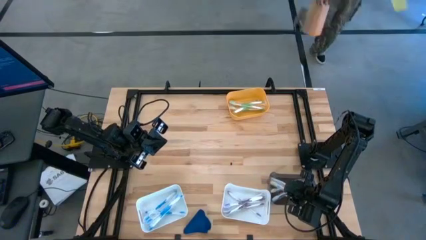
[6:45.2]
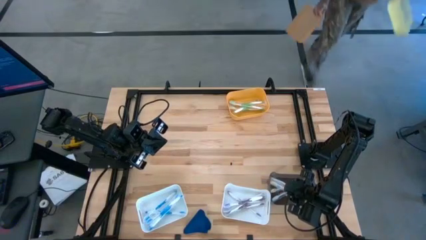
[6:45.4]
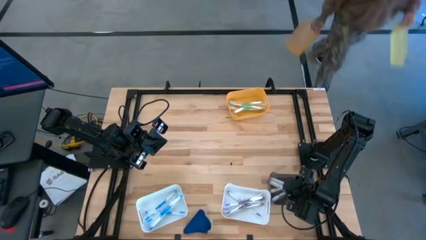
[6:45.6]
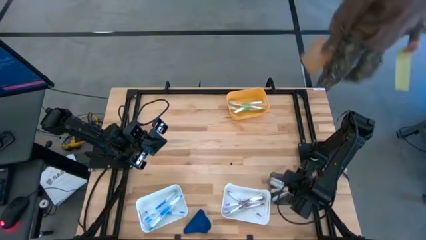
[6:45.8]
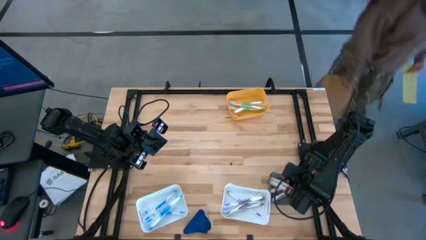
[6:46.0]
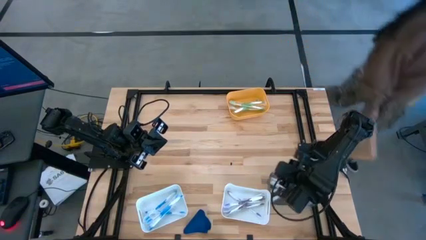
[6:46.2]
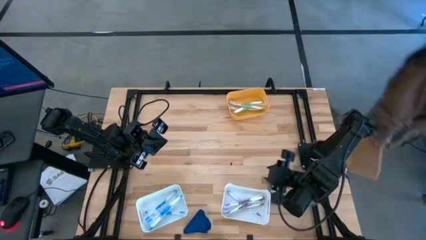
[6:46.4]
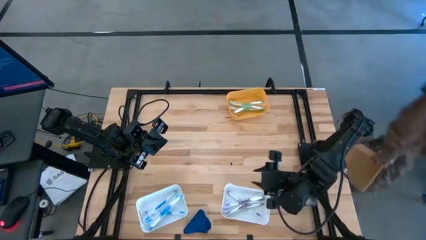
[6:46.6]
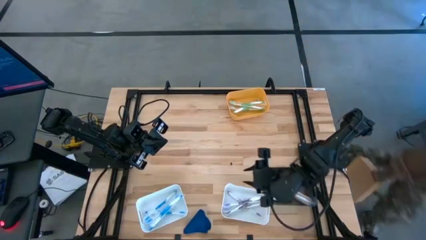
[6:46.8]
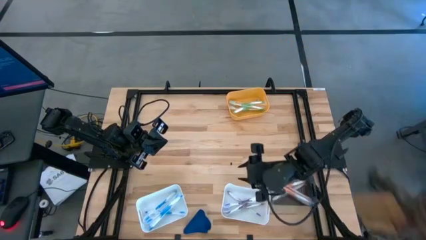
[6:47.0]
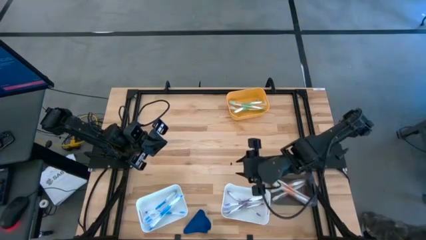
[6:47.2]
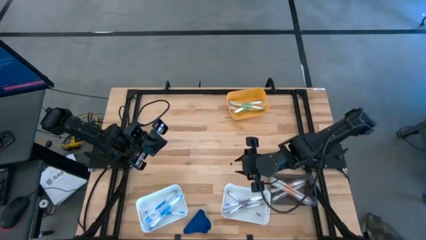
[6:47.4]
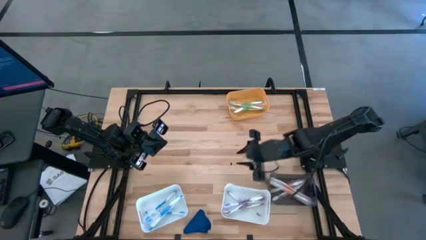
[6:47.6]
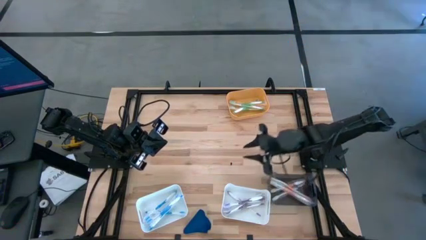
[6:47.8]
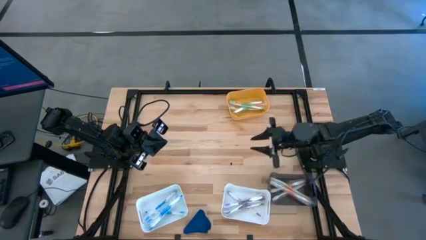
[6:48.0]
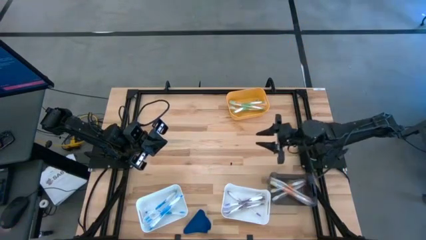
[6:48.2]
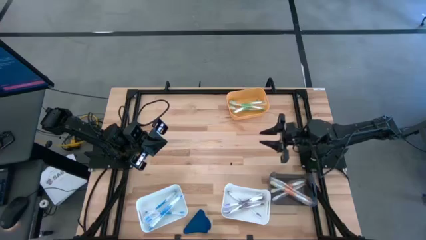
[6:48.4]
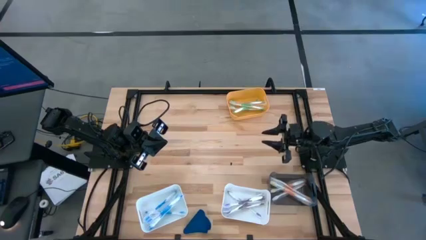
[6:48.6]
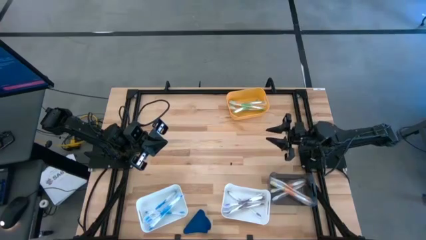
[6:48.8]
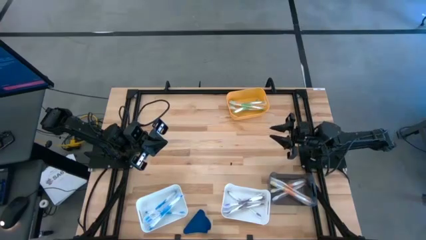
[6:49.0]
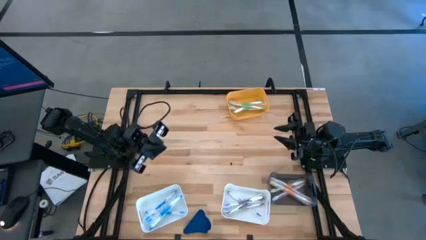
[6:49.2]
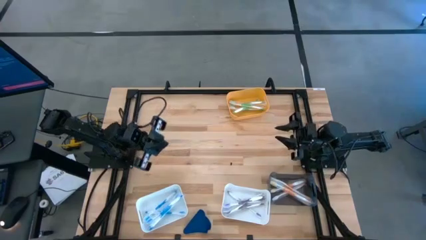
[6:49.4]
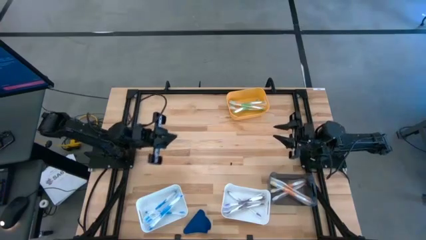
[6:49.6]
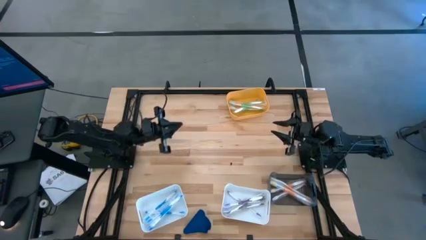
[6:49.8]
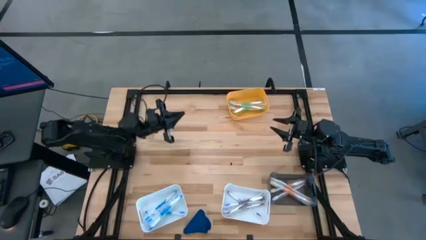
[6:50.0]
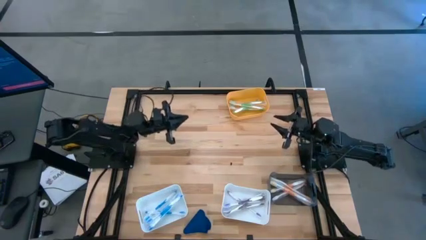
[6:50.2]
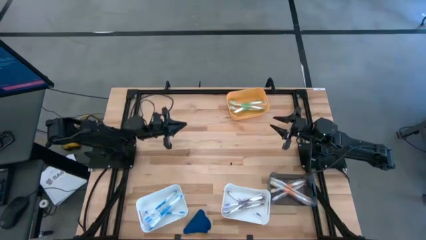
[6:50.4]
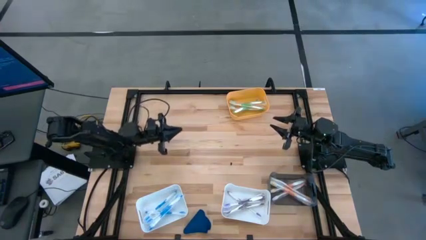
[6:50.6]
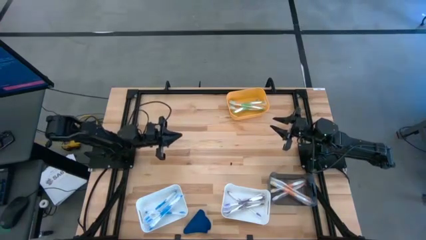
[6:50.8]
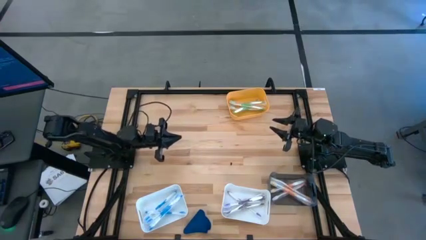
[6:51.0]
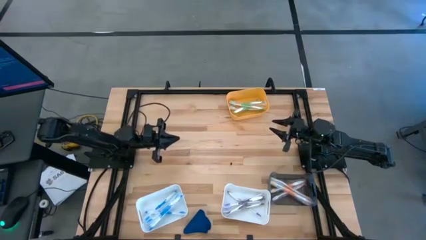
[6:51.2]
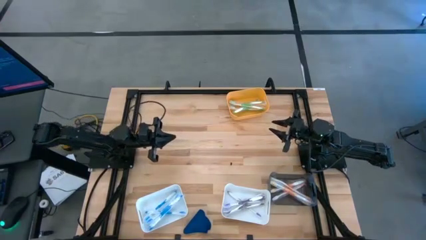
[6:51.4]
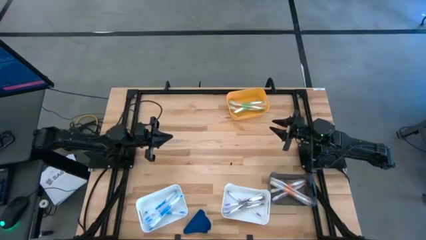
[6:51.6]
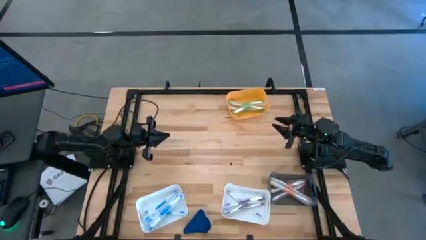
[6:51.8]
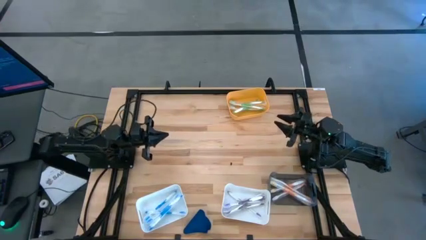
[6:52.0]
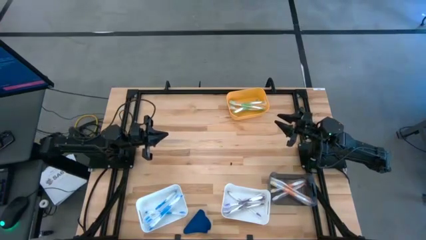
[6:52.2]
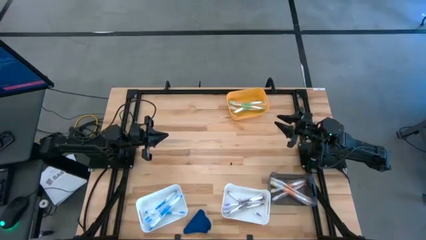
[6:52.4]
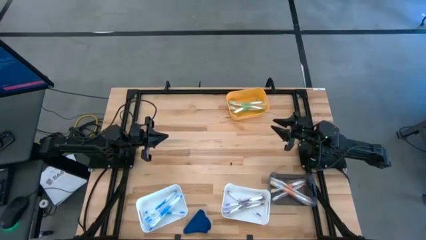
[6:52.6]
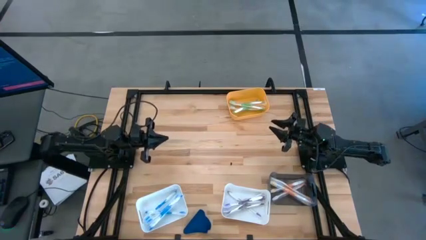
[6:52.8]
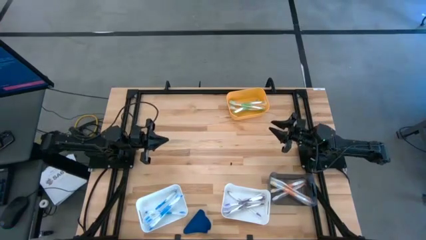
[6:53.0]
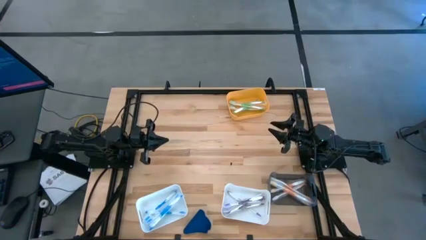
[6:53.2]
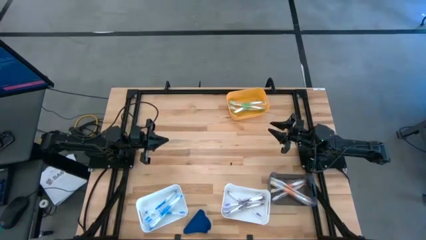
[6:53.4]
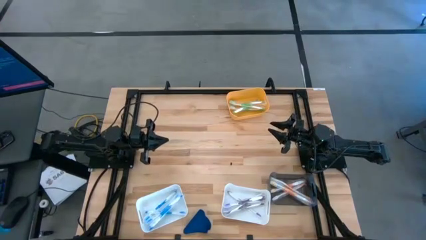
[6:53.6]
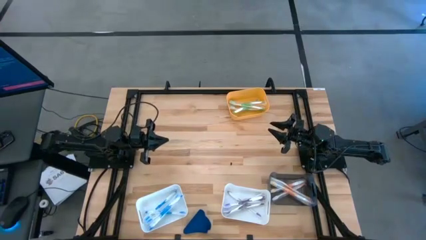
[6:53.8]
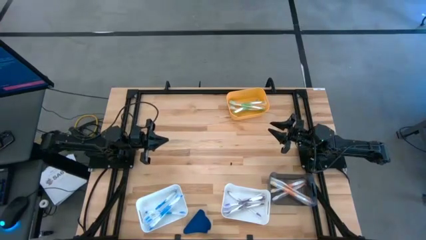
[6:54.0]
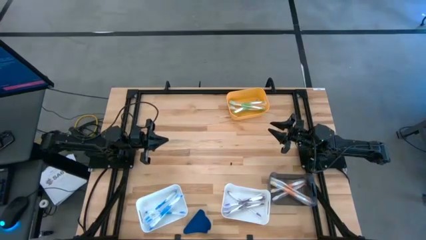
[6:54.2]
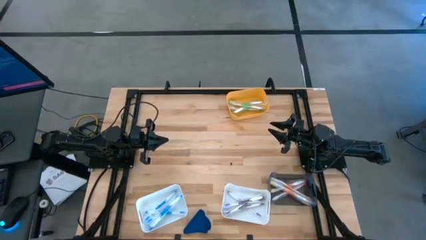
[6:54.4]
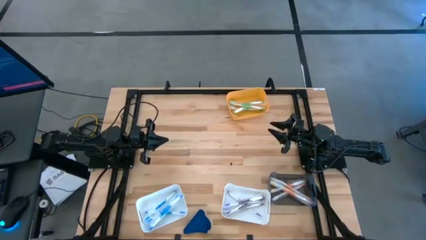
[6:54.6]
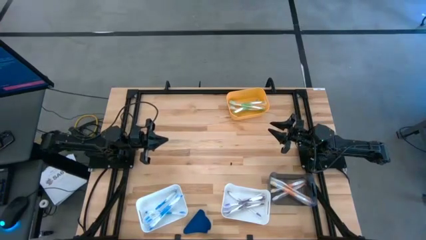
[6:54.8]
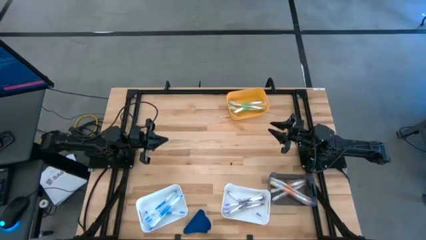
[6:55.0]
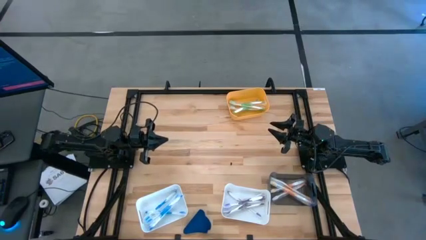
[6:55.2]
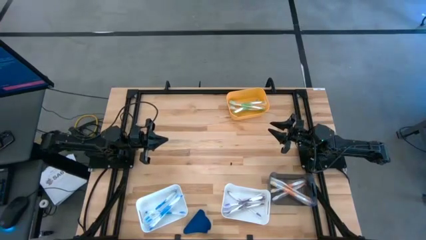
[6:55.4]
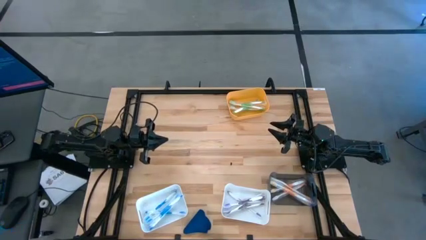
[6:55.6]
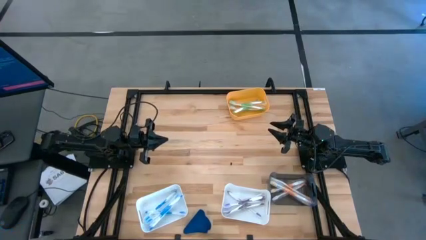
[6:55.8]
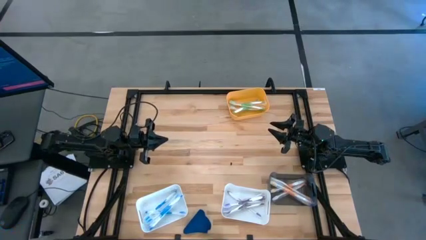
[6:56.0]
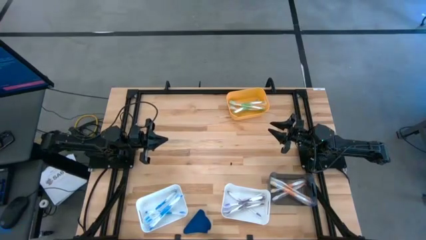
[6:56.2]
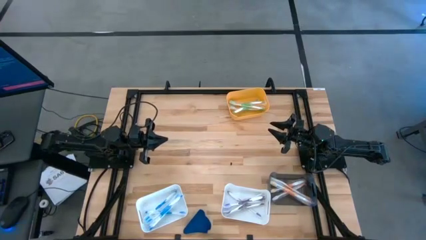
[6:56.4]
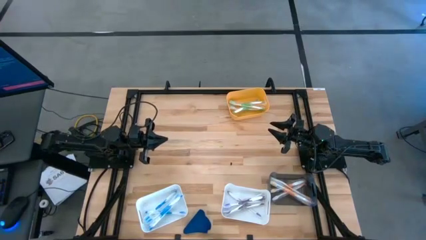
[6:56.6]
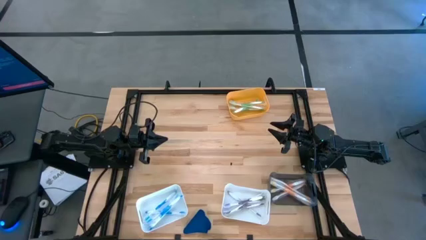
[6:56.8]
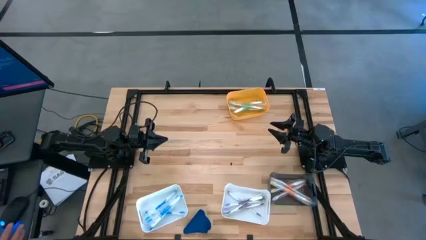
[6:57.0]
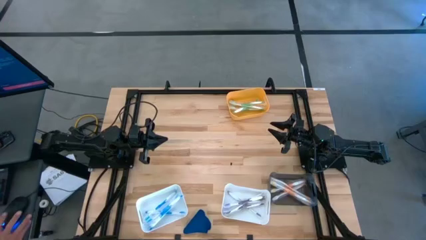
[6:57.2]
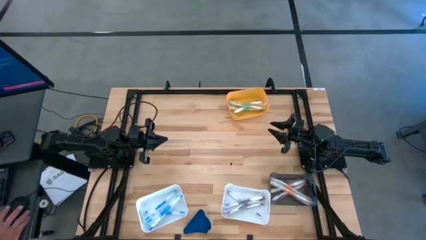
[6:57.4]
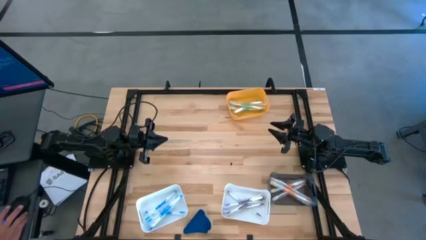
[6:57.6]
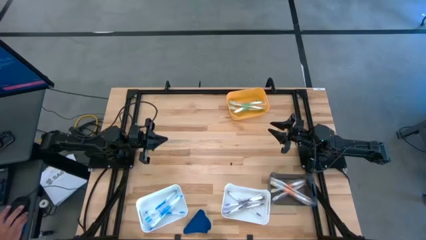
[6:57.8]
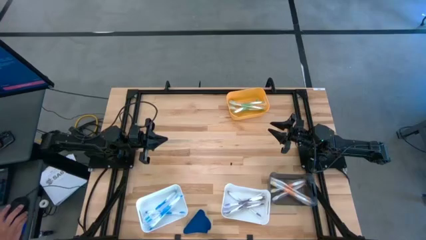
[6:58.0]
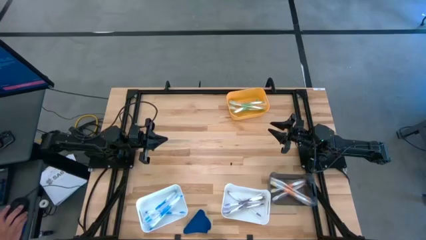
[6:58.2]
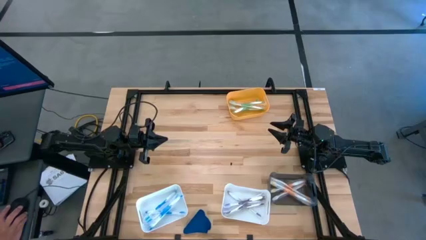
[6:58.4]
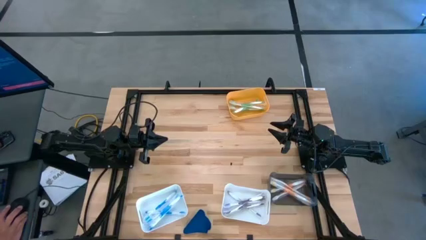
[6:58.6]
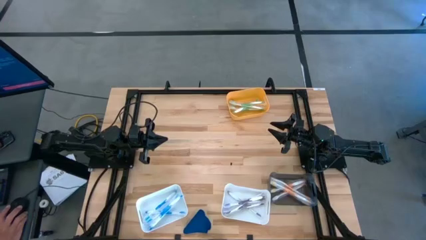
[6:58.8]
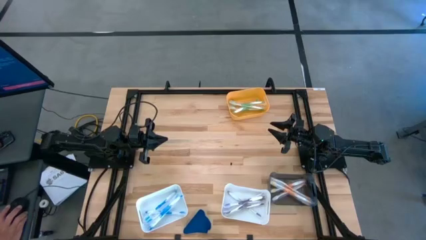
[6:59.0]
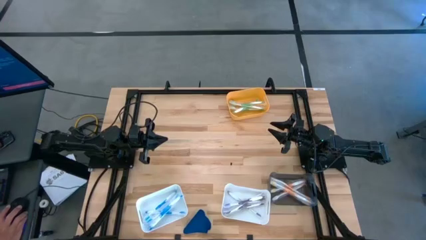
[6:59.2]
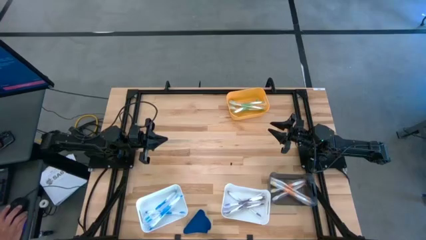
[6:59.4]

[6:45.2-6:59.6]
Task: Pick & Place Toothbrushes
Return to Home Position
